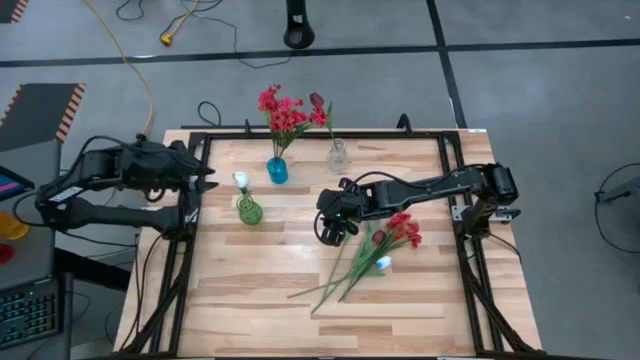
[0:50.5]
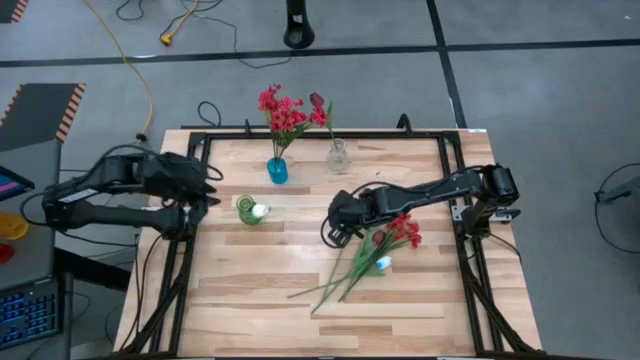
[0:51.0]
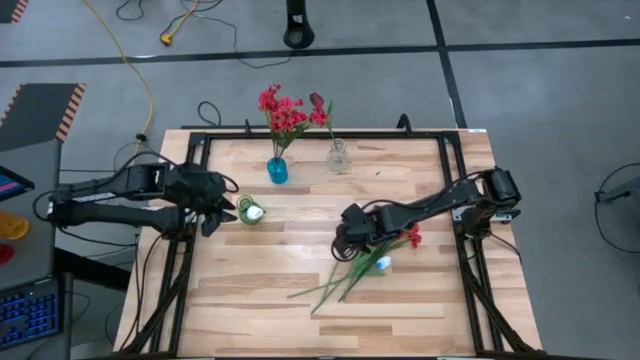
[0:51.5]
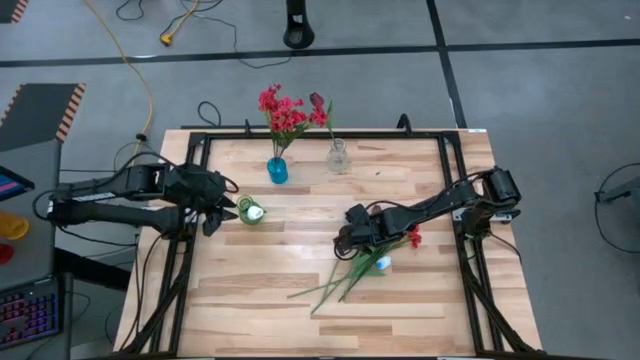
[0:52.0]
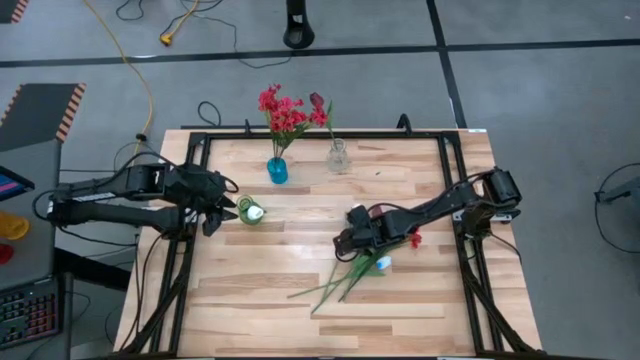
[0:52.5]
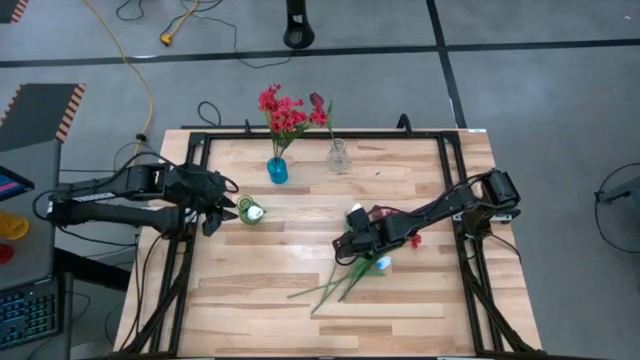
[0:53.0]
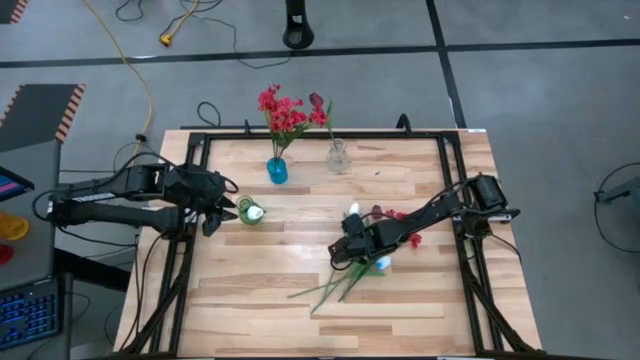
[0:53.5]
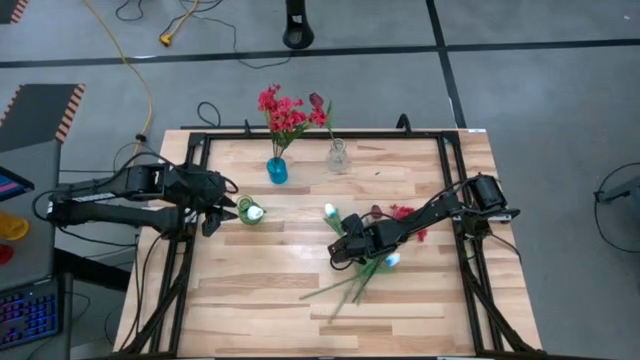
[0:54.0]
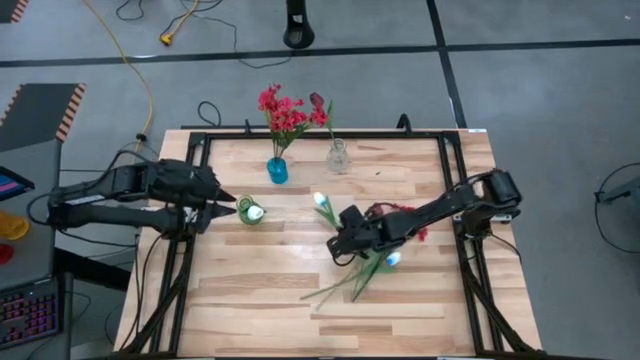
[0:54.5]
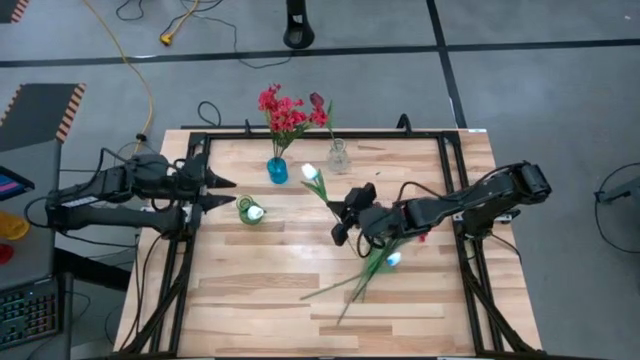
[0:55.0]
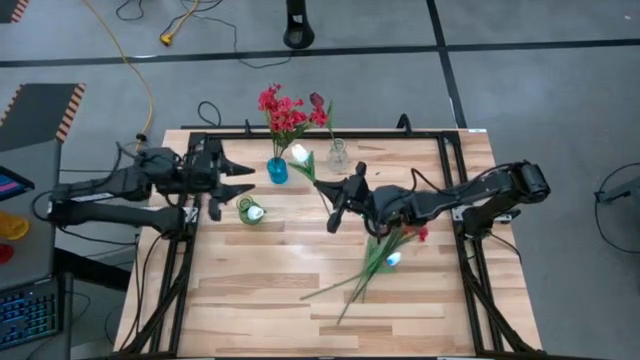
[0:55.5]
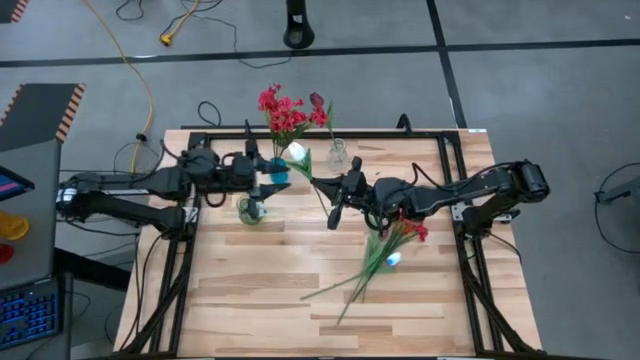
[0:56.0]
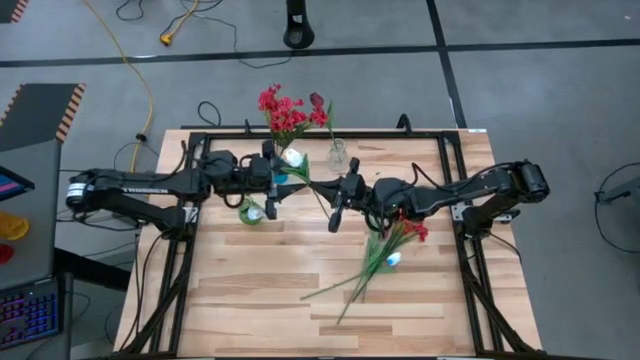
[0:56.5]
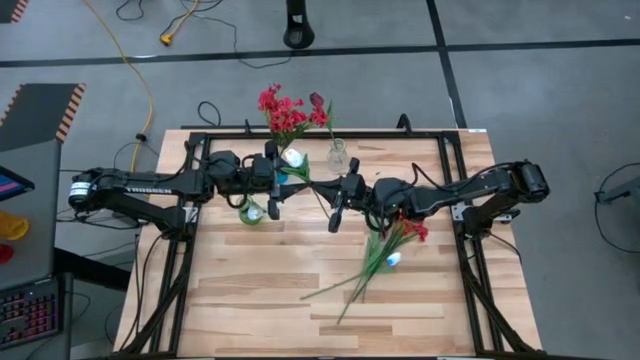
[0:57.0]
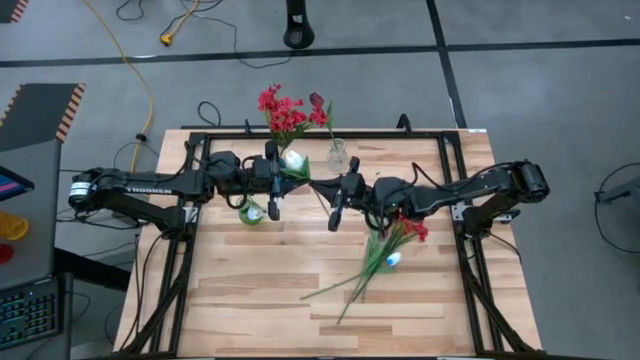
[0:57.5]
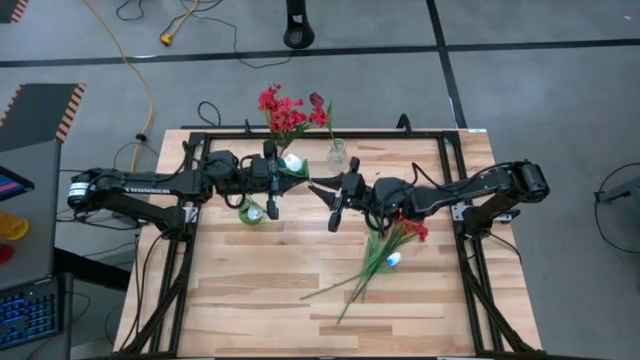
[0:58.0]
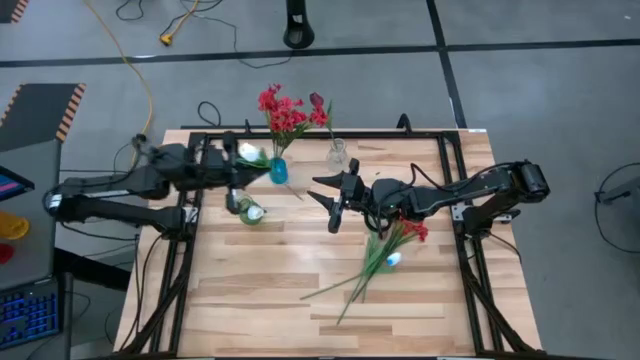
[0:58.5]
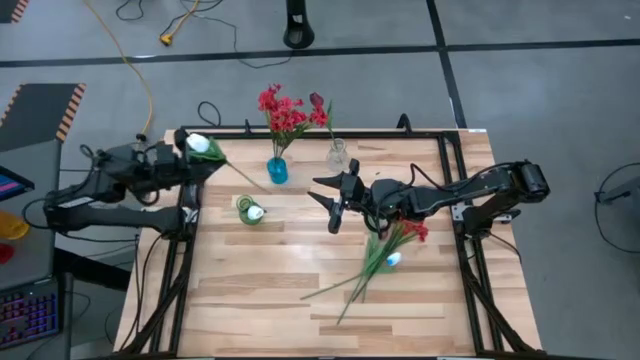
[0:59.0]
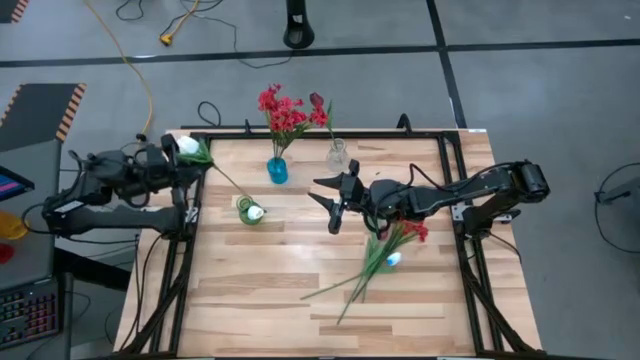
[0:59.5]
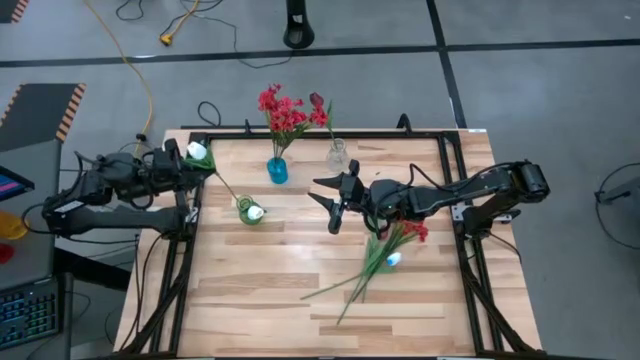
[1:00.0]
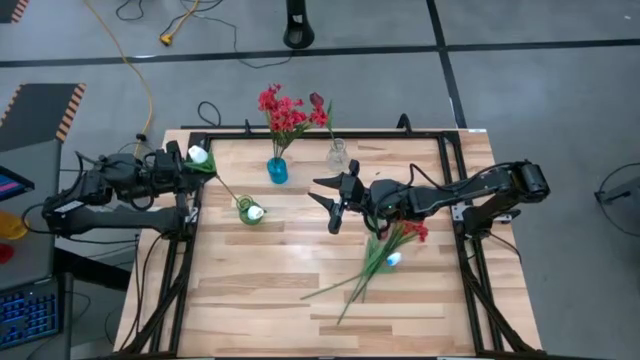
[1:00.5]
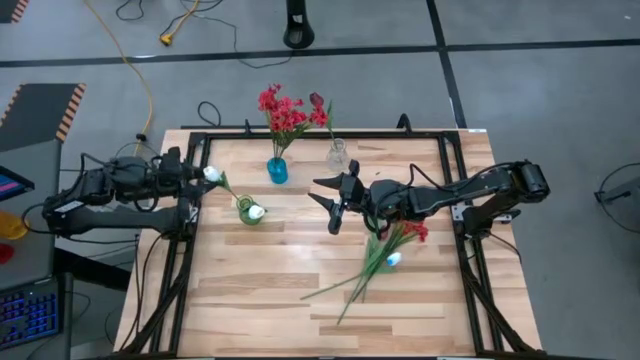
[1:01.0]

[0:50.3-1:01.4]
Task: Sort flowers into vase by color
Put the white left tulip into the green vase

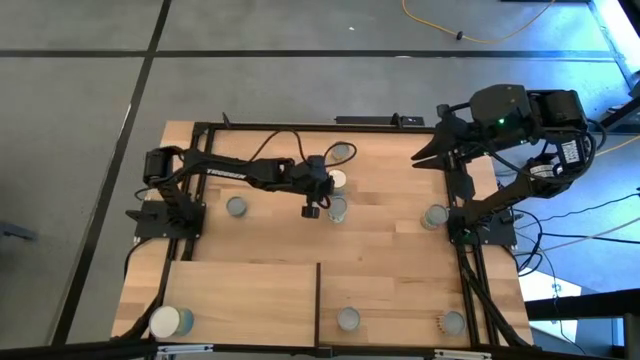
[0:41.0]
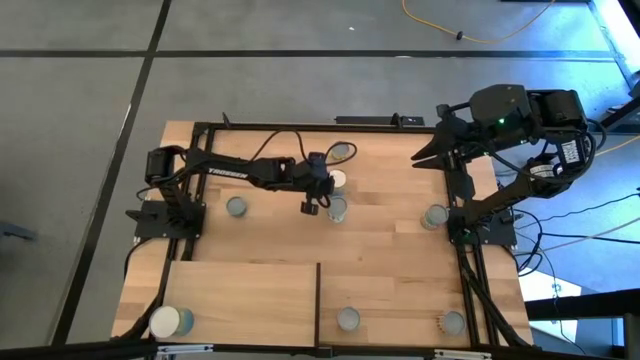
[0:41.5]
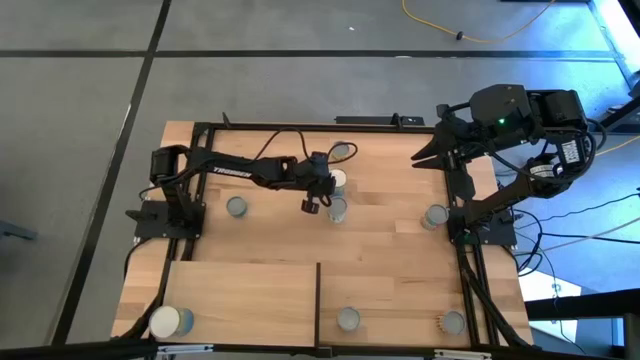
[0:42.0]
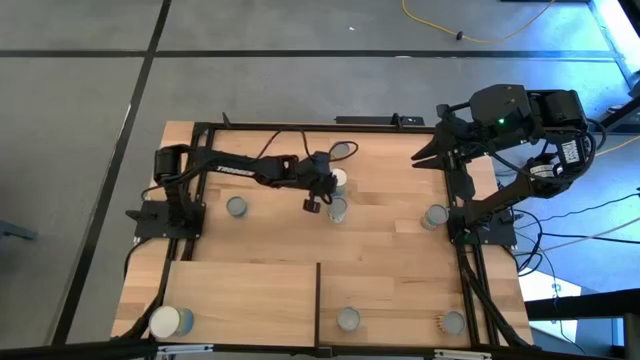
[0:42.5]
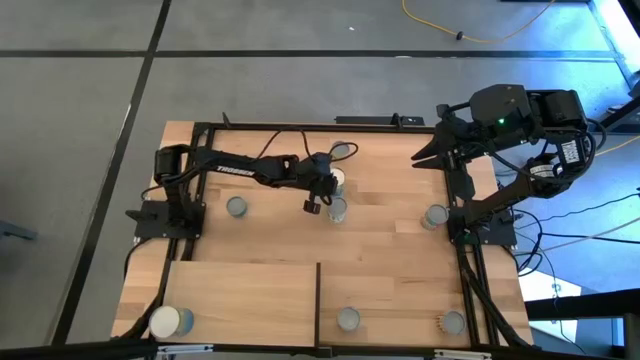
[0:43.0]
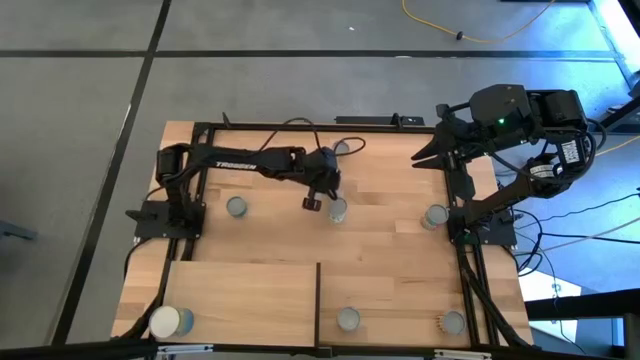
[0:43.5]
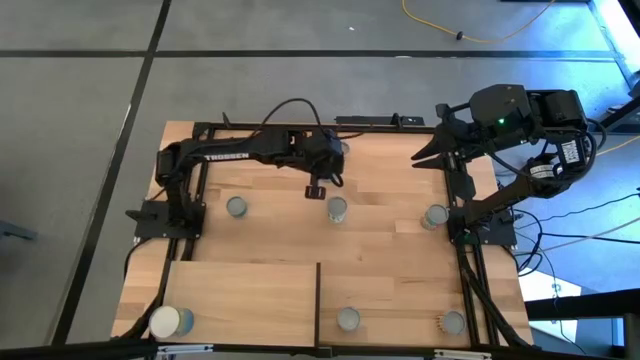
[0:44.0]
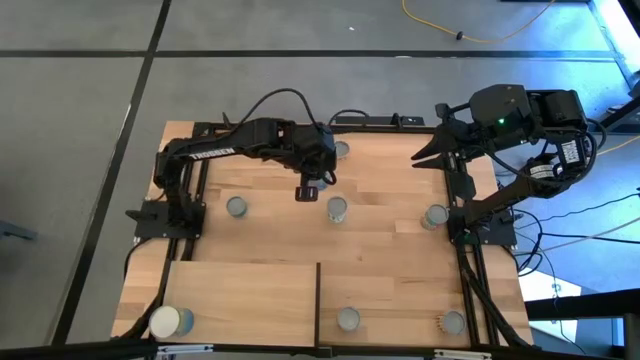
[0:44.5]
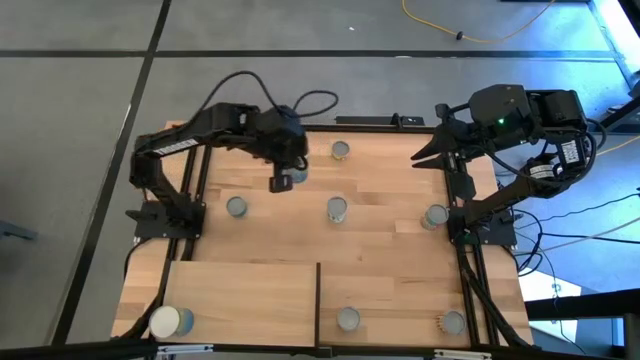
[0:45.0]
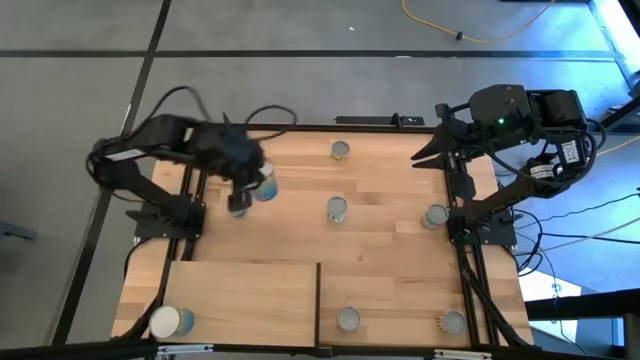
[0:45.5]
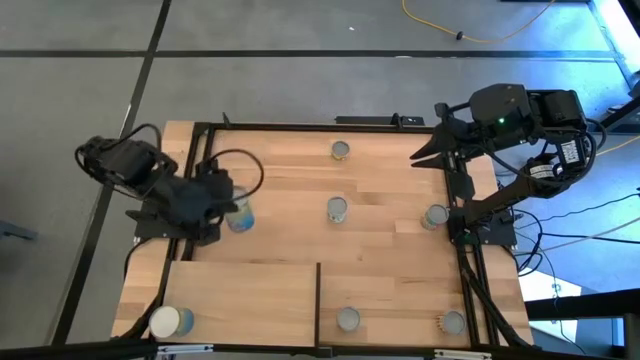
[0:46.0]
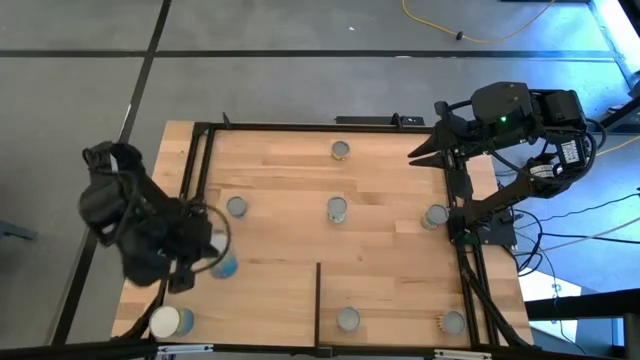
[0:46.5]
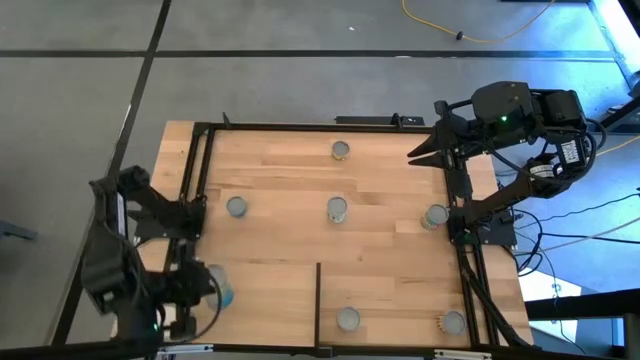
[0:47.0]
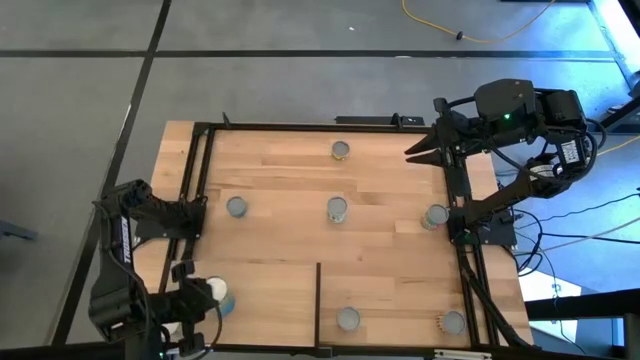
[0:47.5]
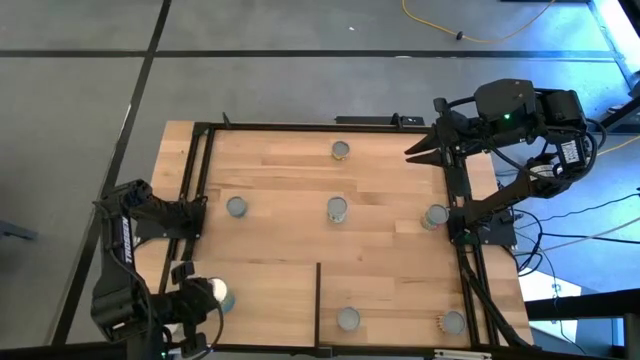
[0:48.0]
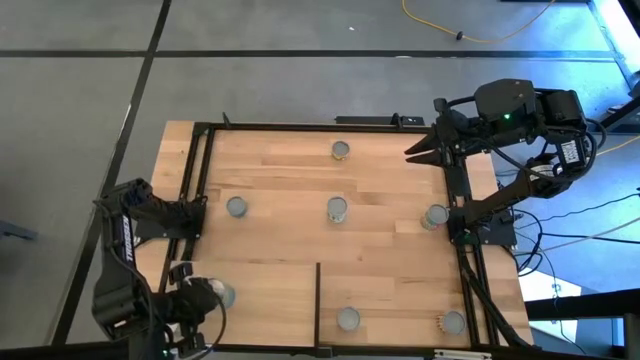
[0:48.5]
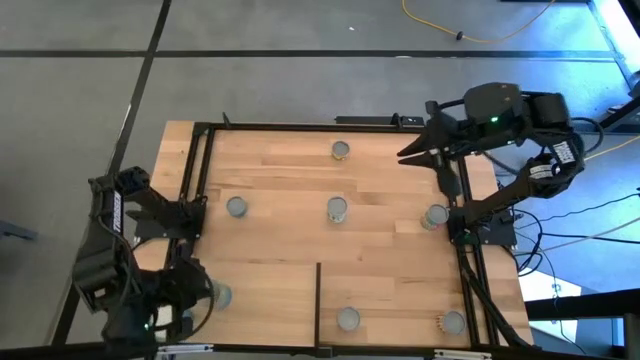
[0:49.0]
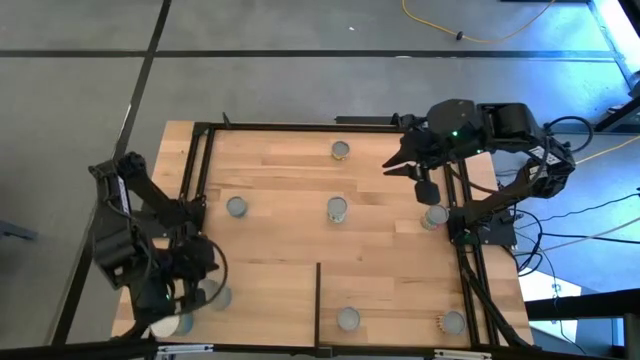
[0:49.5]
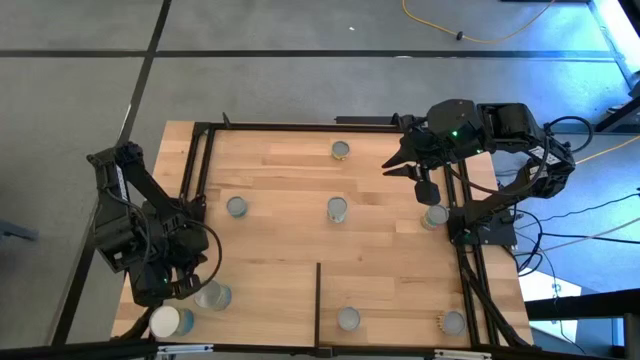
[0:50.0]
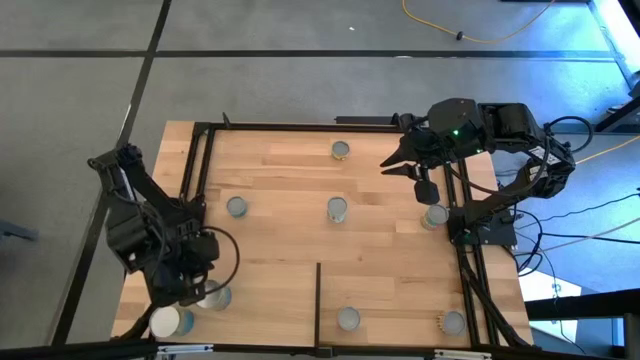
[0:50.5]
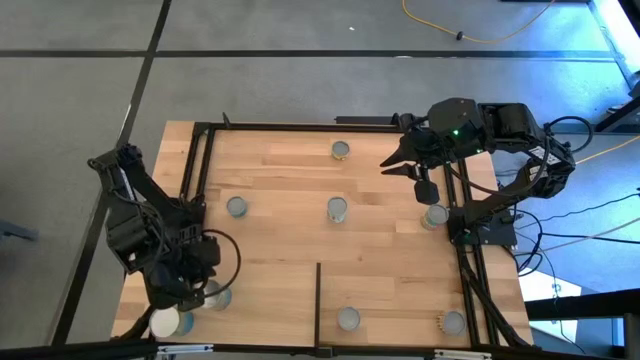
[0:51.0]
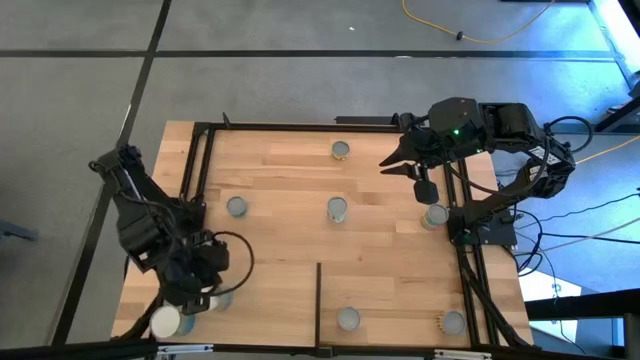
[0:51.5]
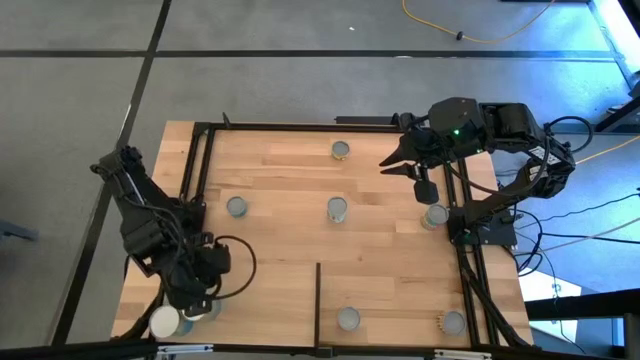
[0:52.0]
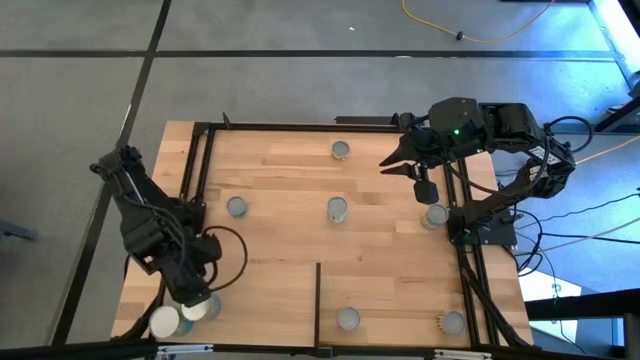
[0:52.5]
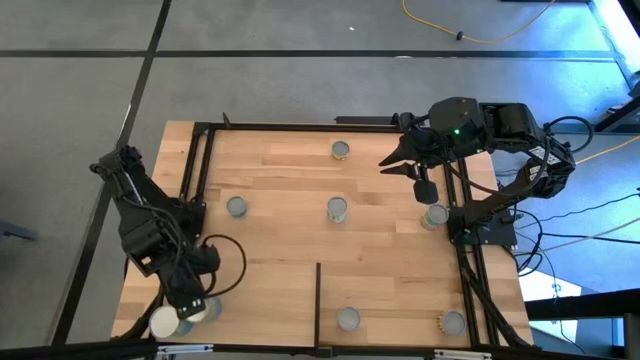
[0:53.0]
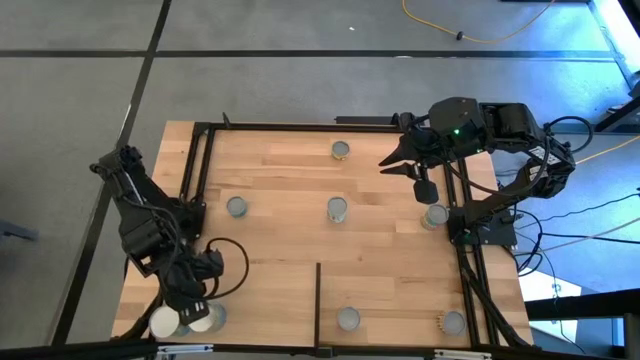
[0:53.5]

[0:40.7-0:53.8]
Task: Pick and place cans onto a shelf
Put the canned cherries on the shelf
